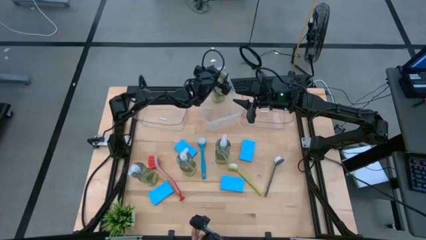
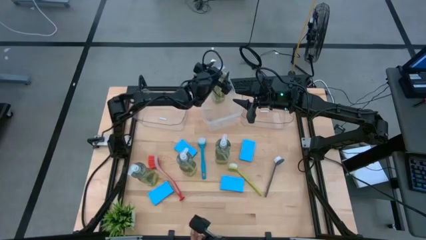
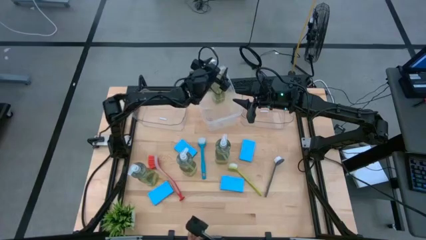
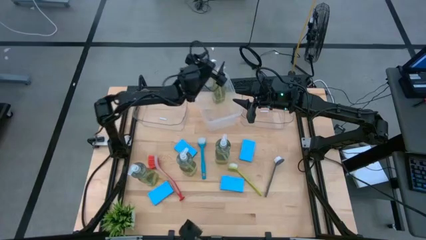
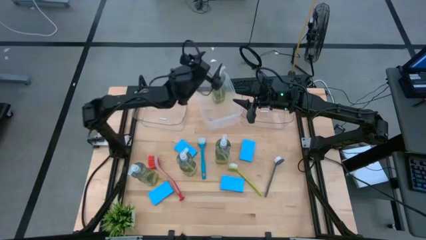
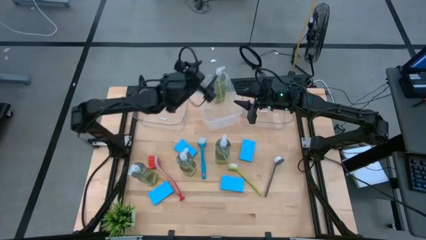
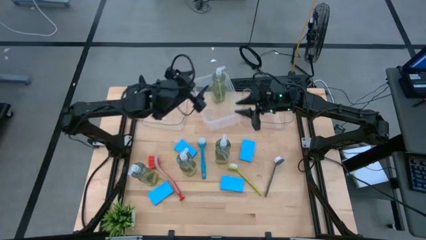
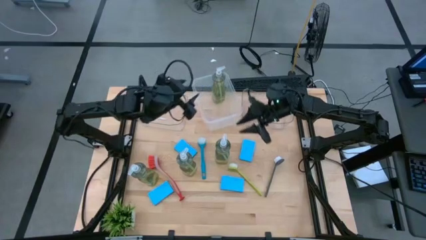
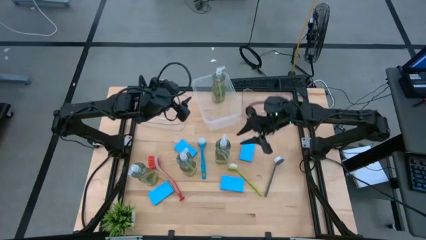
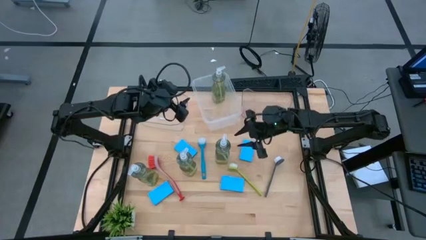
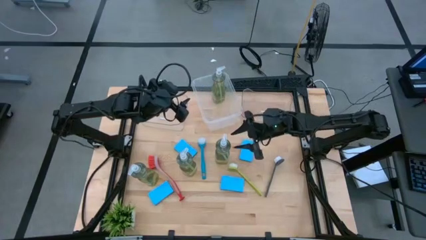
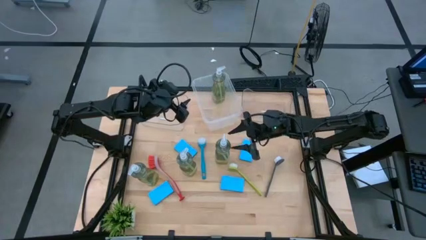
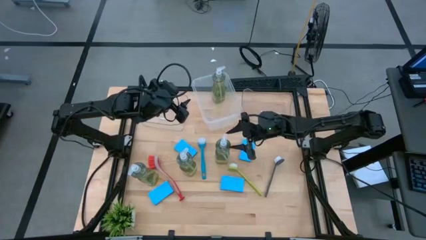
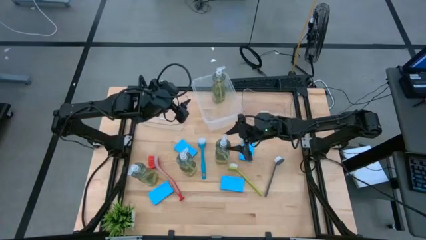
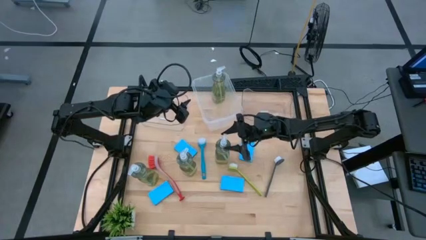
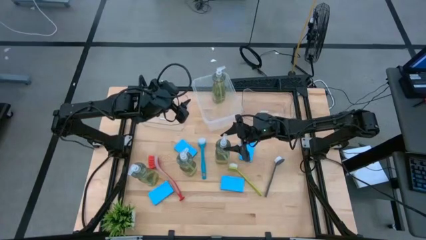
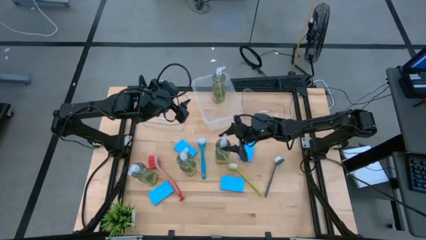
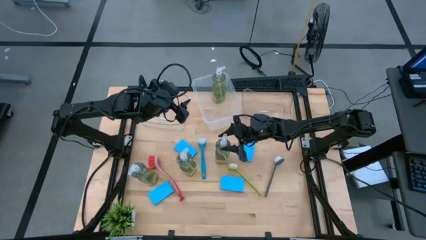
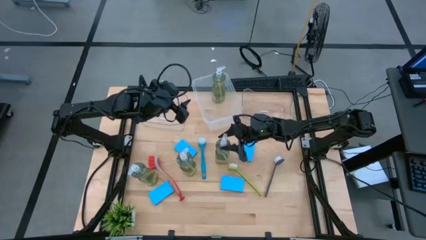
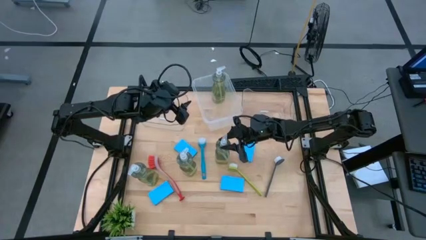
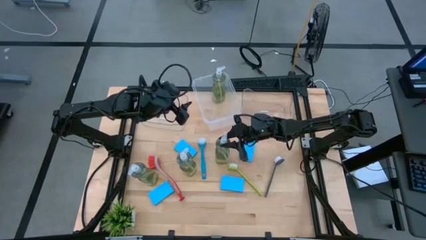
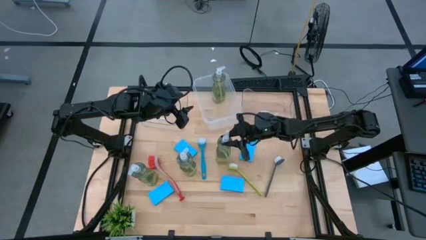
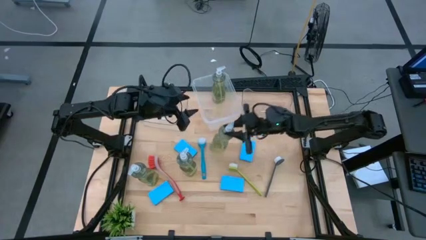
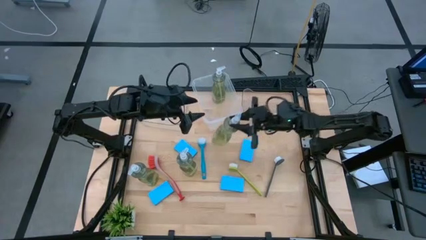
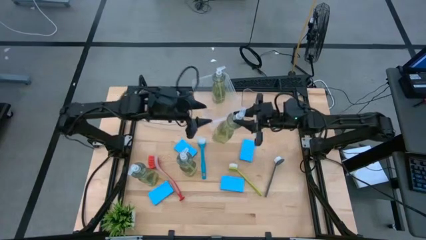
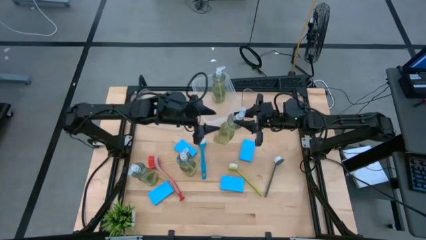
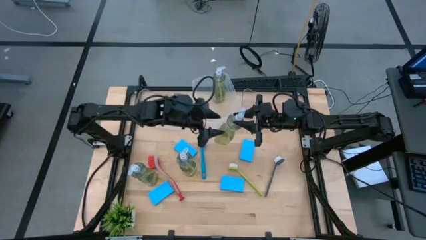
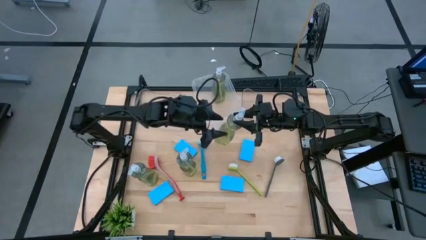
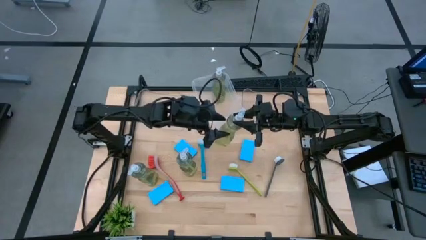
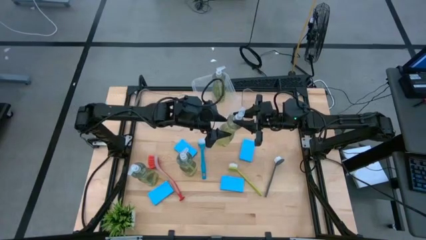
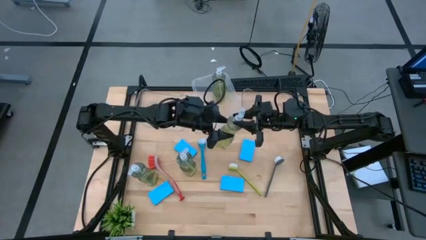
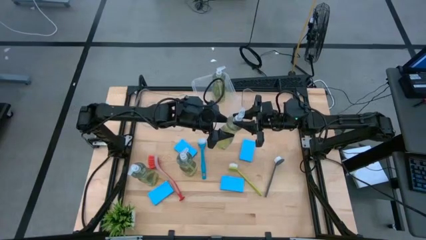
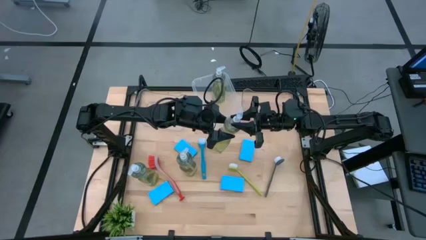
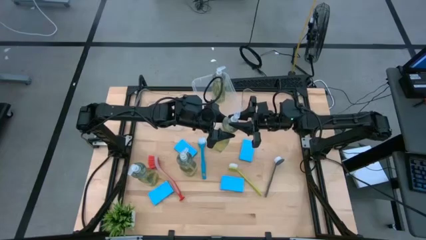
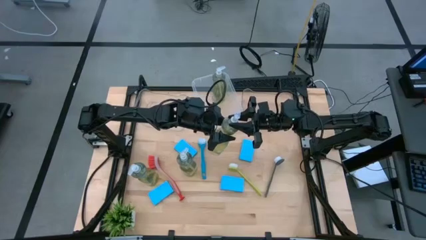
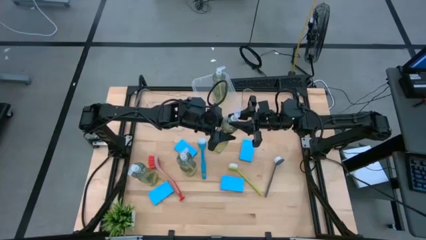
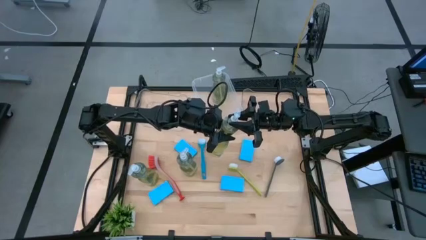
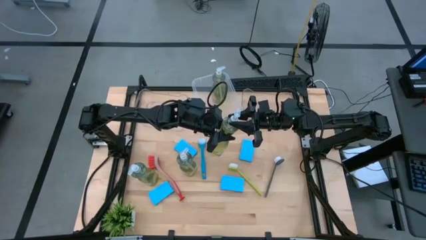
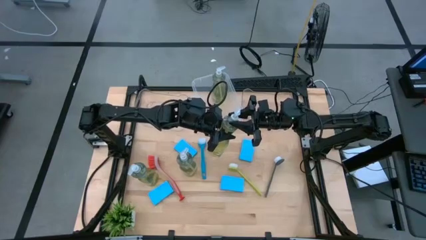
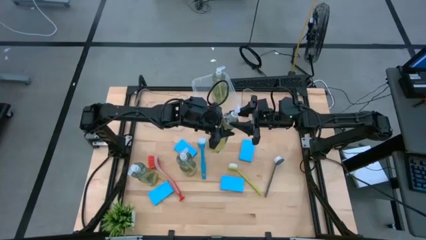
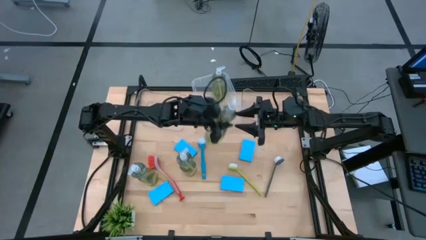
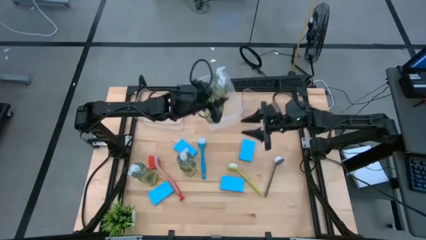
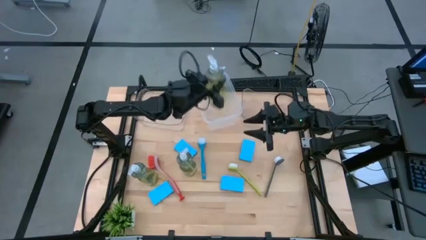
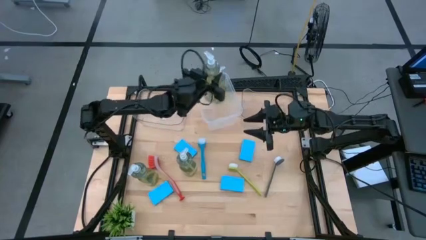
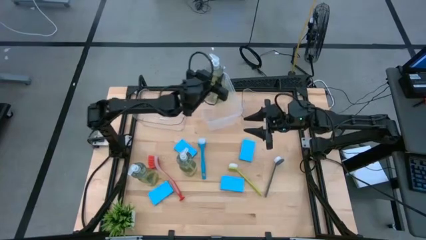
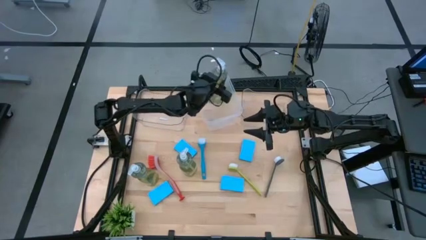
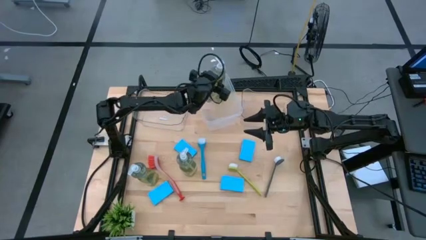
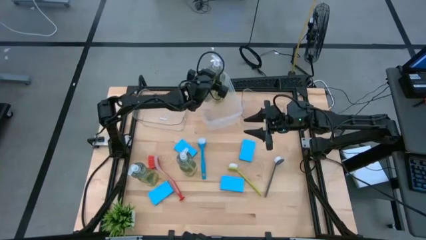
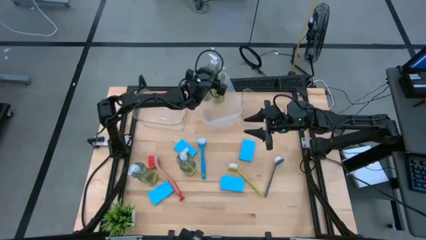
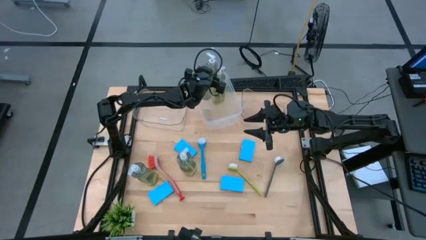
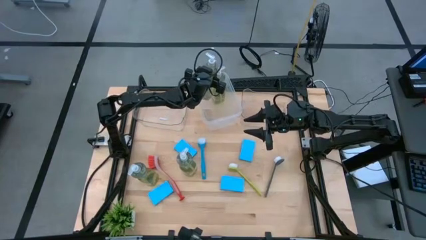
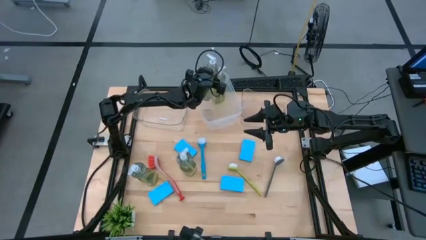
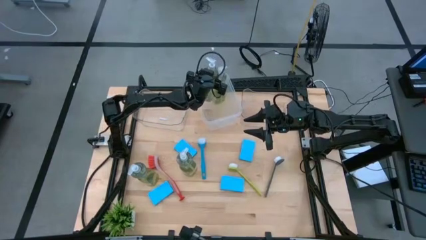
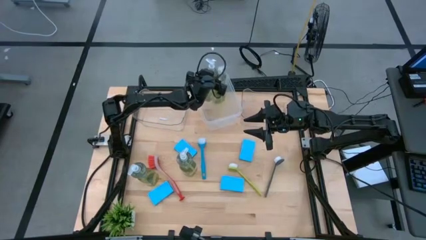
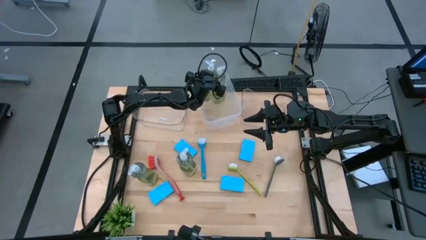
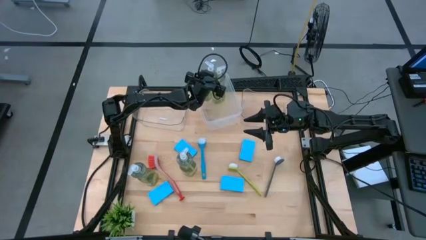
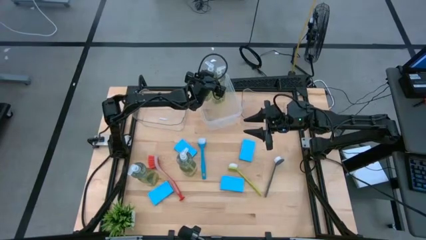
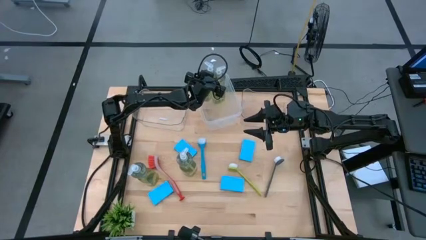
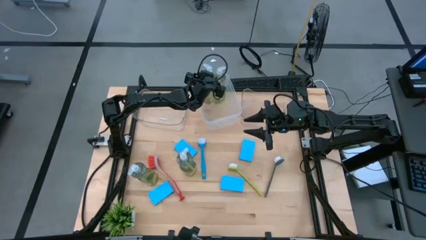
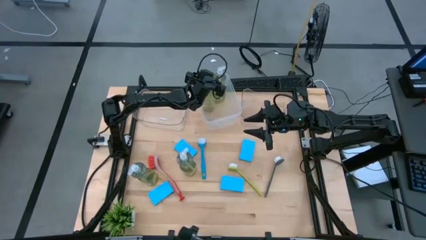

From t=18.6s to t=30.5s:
Task: Pick & Place Kitchen Sink Supplies
Put the yellow soap dispenser into the white bin

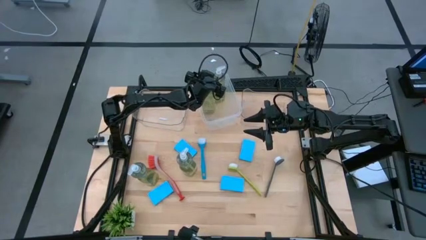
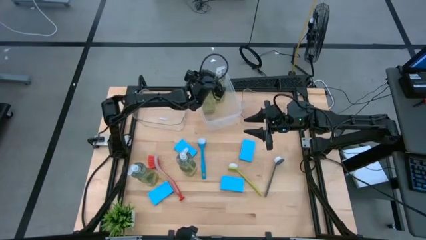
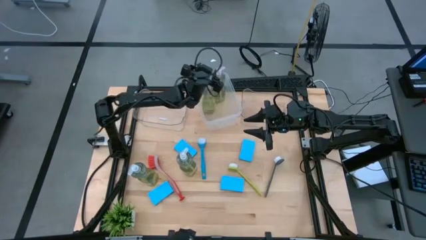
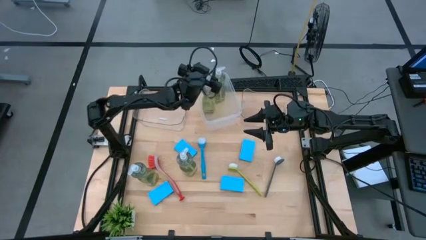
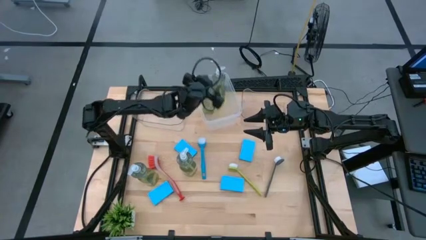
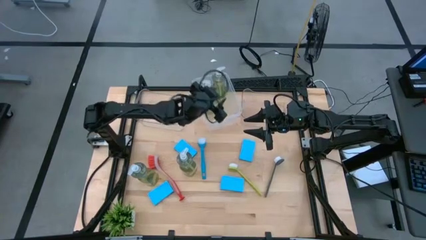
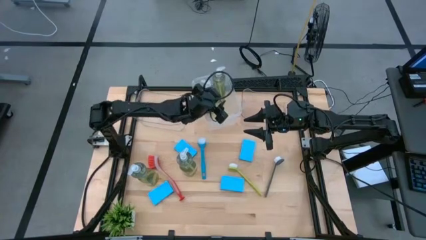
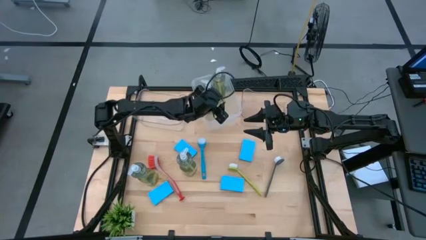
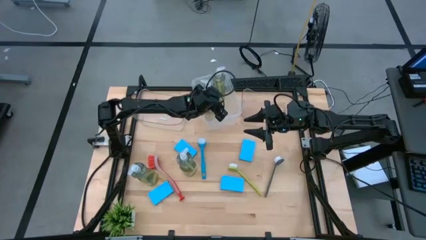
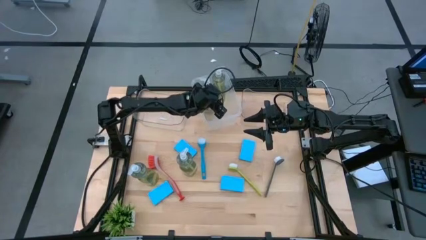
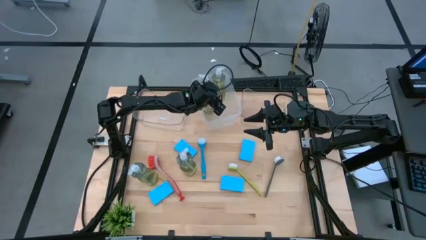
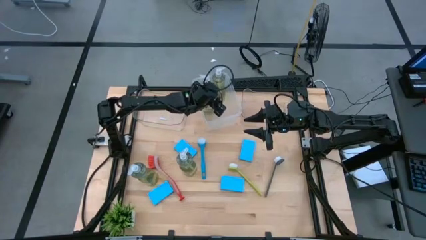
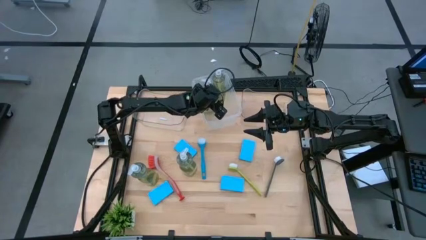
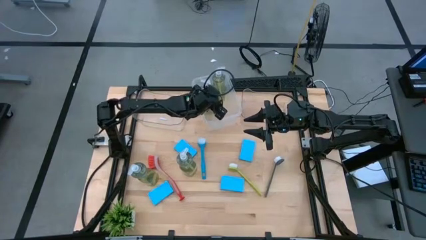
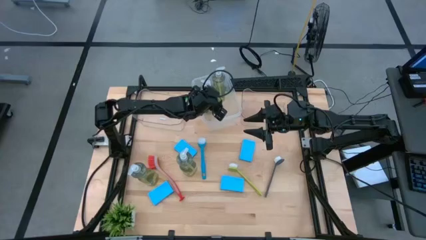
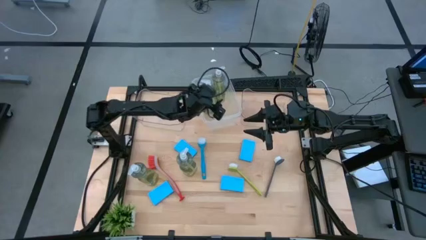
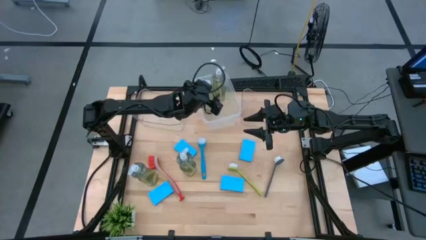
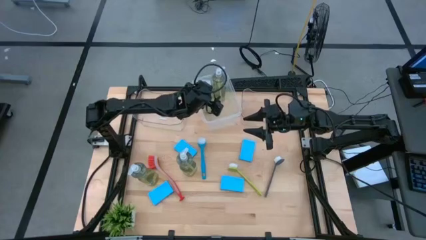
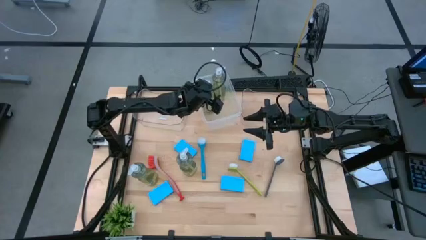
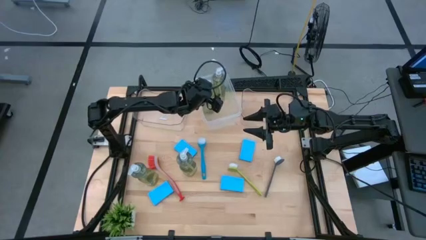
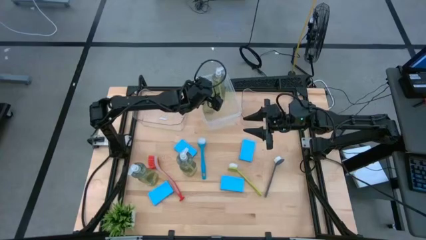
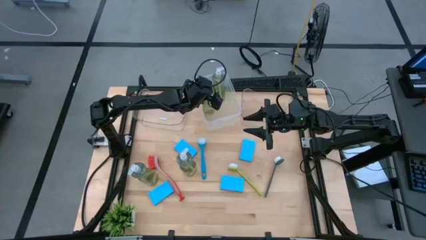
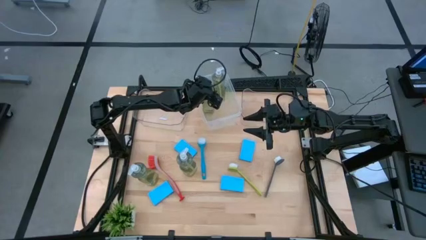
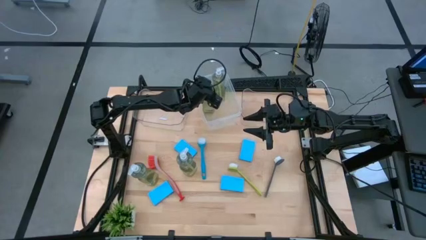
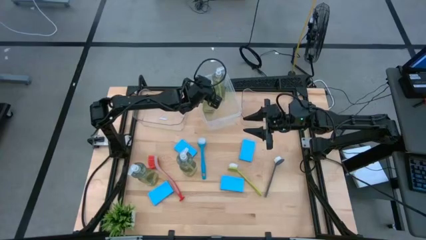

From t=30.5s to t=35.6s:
Put the yellow soap dispenser into the white bin
